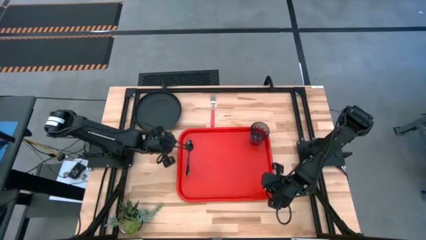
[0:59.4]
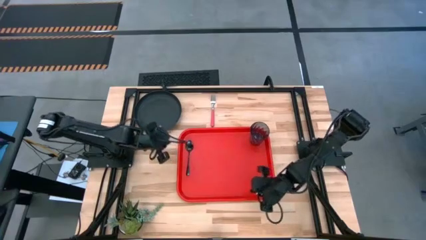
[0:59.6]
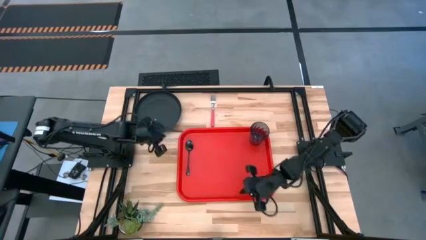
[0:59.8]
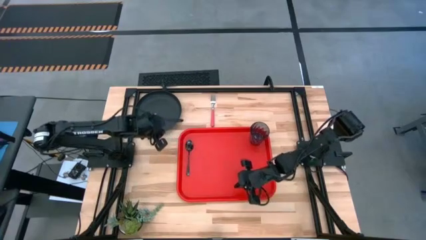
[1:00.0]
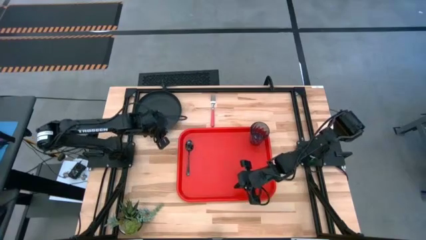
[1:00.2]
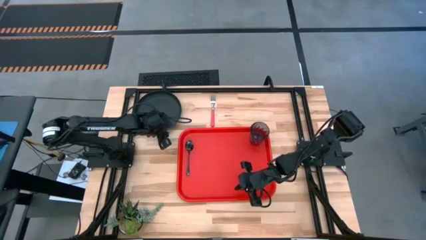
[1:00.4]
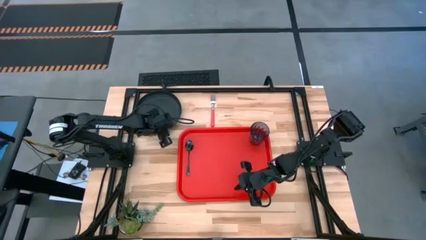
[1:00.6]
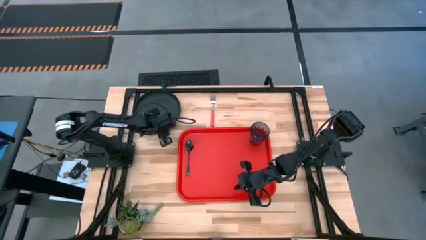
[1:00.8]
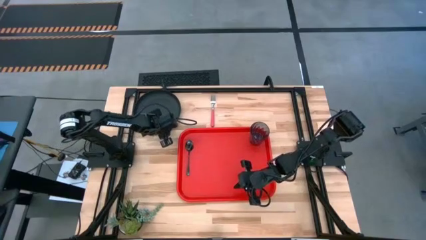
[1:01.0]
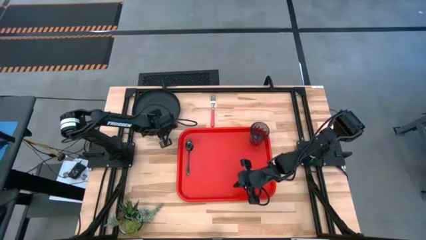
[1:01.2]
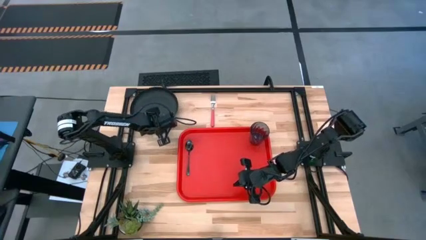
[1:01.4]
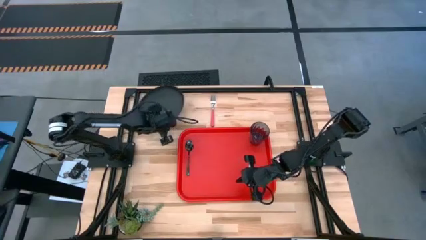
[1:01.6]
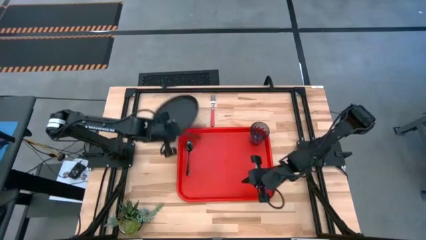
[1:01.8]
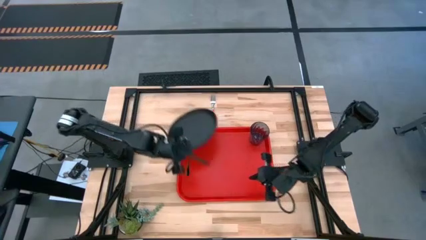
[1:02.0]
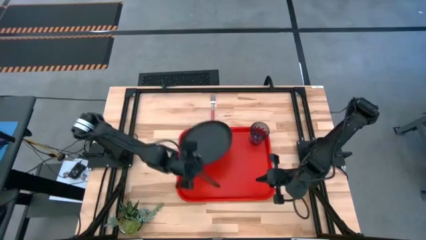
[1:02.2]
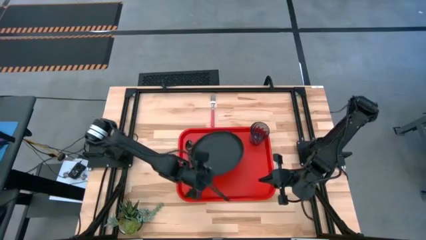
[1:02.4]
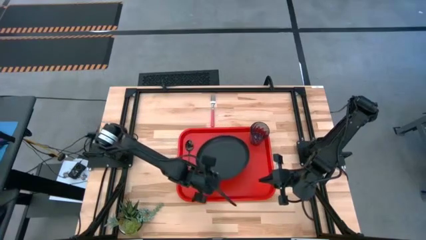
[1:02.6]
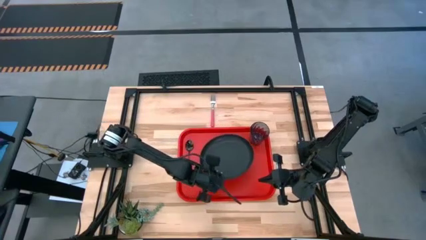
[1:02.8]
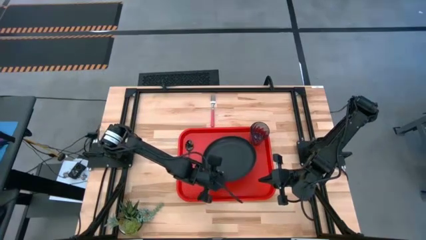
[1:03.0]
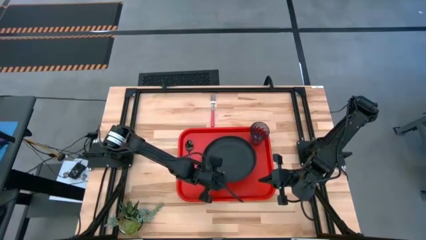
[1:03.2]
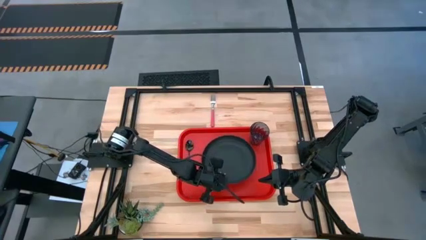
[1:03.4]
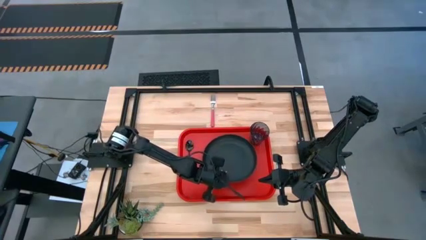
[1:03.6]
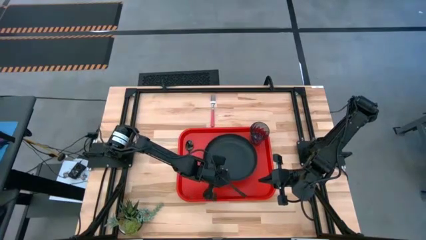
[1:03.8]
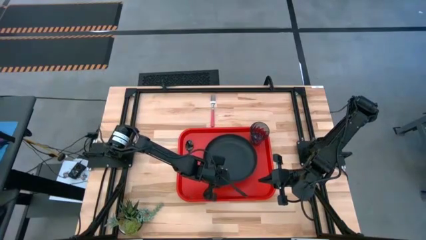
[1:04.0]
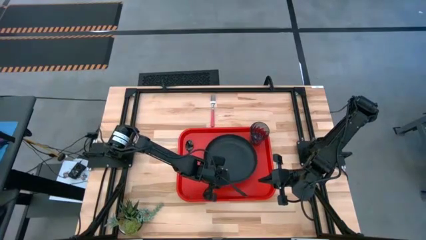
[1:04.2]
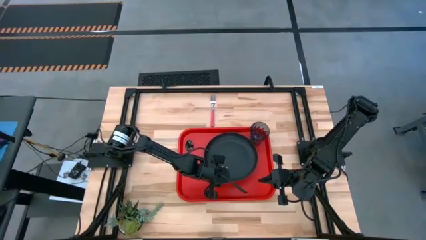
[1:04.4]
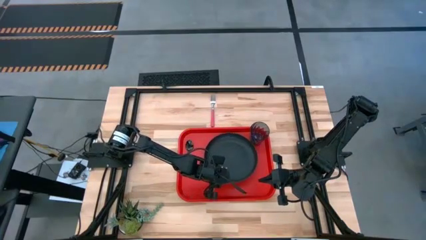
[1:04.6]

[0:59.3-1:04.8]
Task: Pick and place plate/cup/fork/spoon on tray
Put the black plate to the middle of the red serving tray

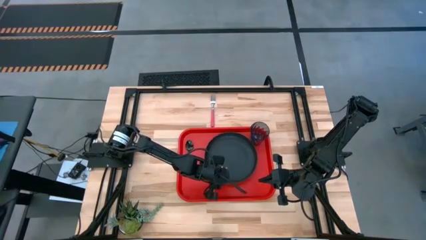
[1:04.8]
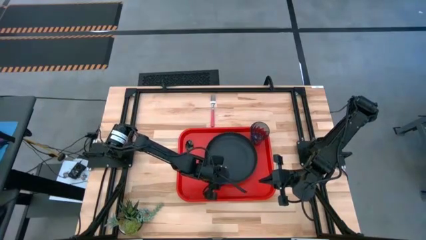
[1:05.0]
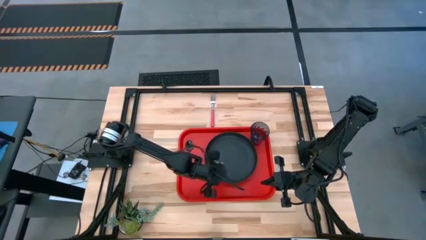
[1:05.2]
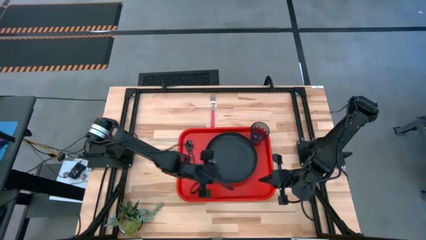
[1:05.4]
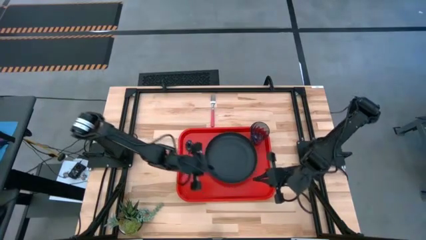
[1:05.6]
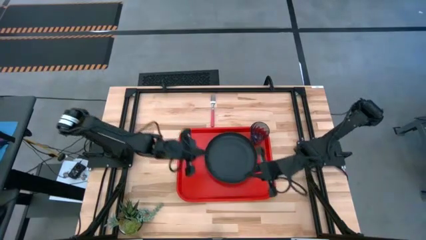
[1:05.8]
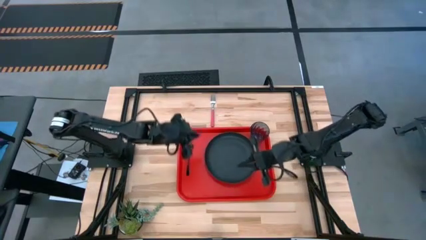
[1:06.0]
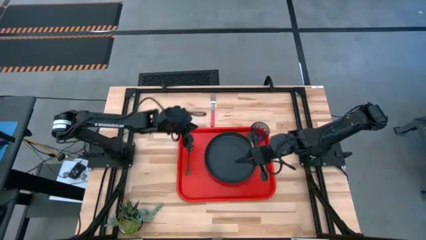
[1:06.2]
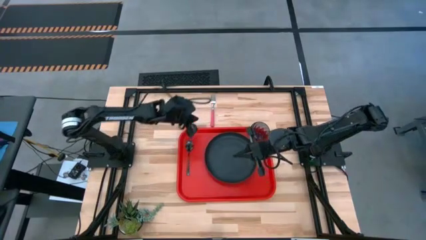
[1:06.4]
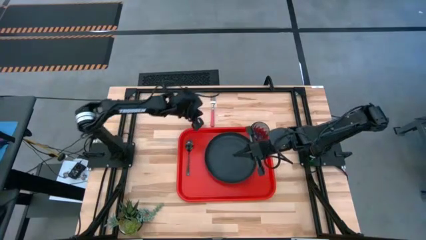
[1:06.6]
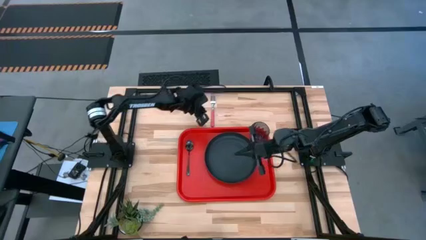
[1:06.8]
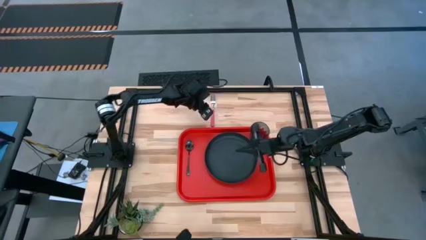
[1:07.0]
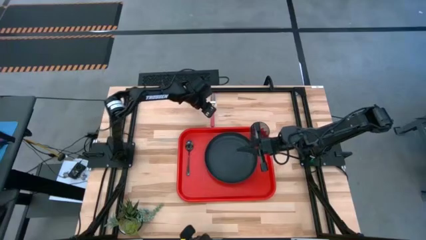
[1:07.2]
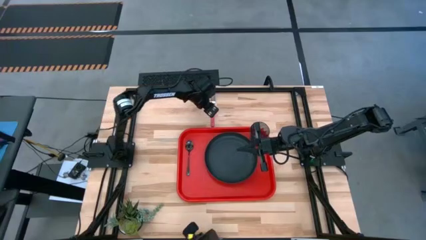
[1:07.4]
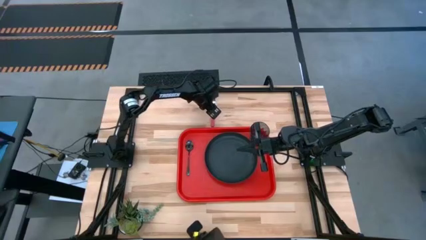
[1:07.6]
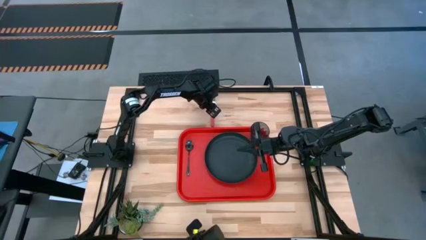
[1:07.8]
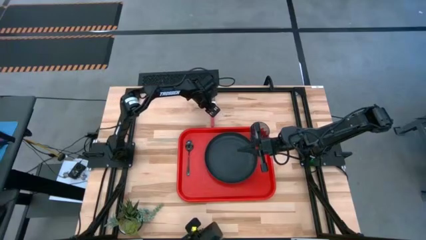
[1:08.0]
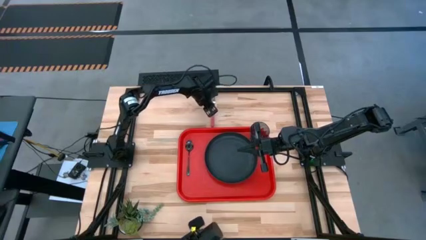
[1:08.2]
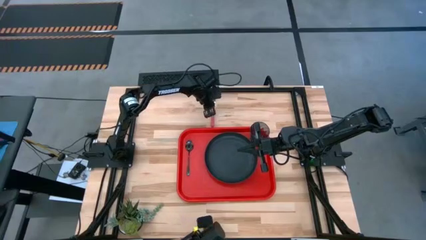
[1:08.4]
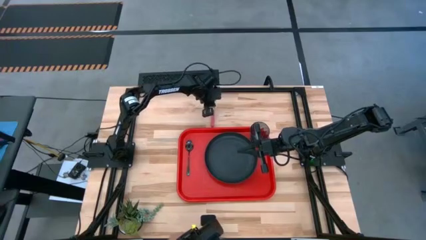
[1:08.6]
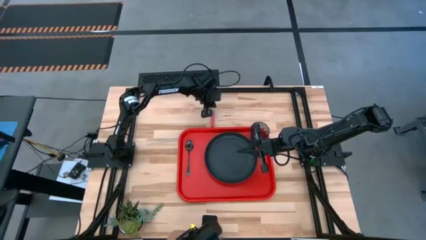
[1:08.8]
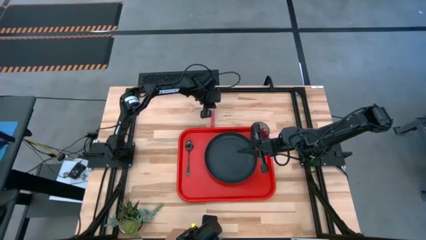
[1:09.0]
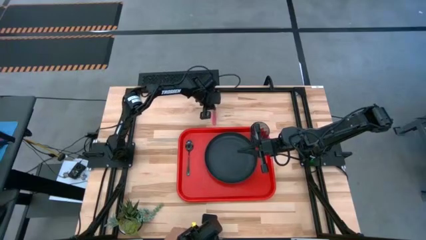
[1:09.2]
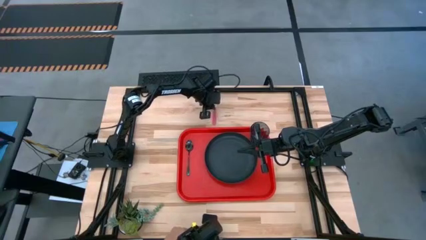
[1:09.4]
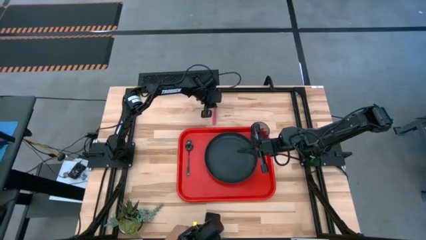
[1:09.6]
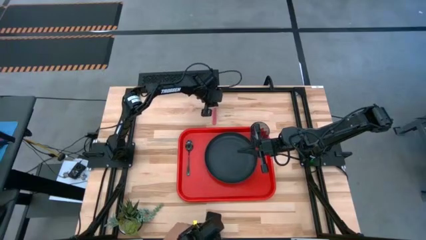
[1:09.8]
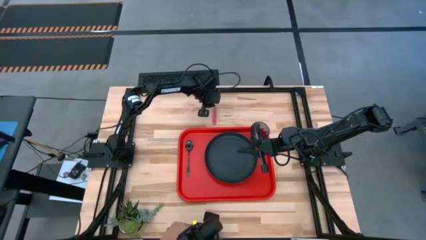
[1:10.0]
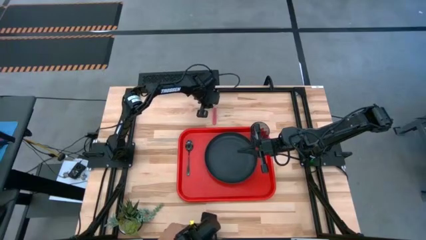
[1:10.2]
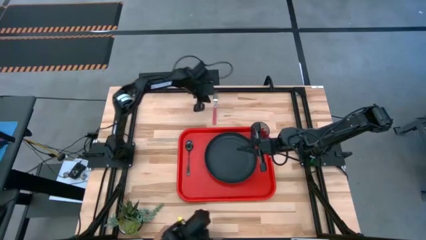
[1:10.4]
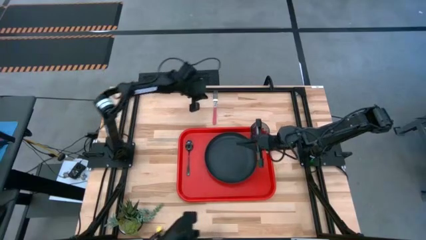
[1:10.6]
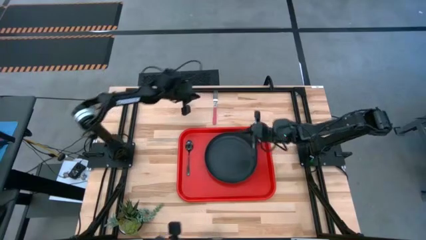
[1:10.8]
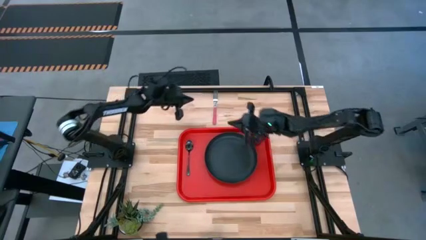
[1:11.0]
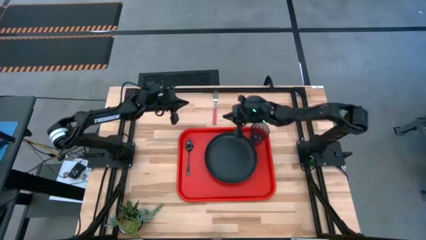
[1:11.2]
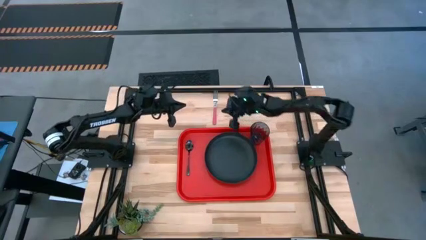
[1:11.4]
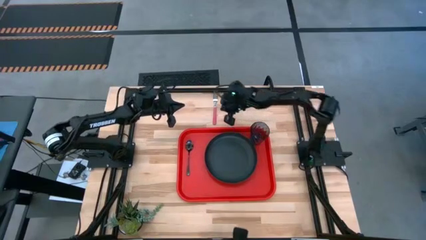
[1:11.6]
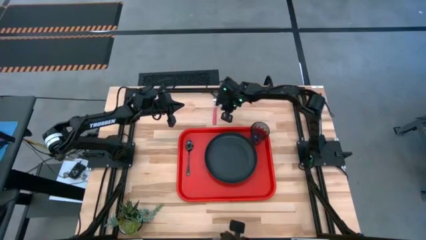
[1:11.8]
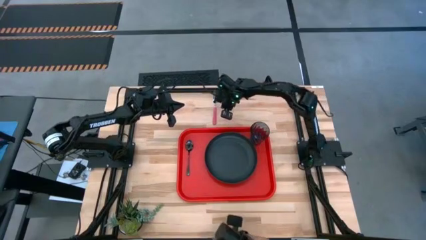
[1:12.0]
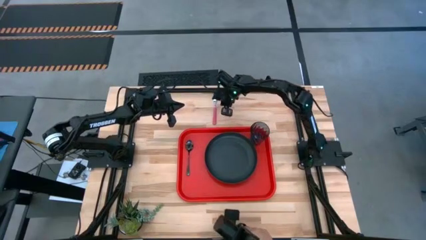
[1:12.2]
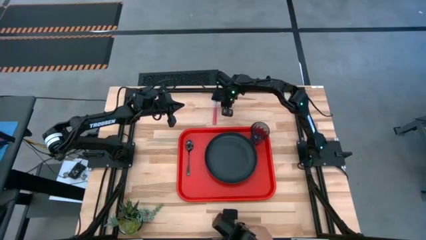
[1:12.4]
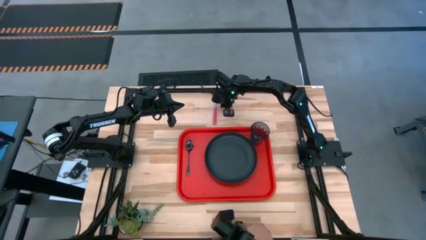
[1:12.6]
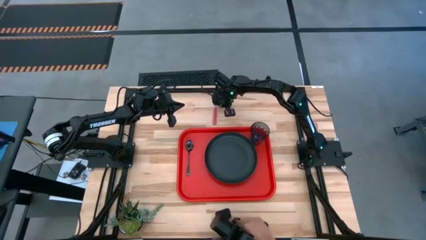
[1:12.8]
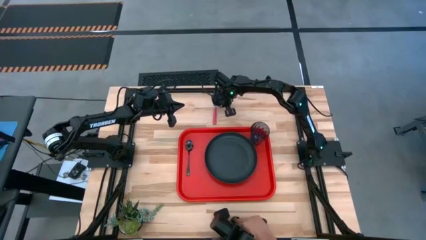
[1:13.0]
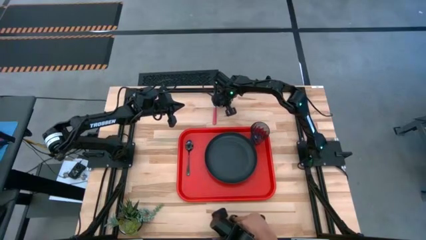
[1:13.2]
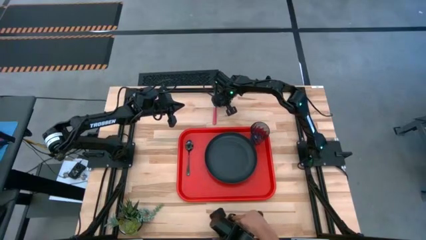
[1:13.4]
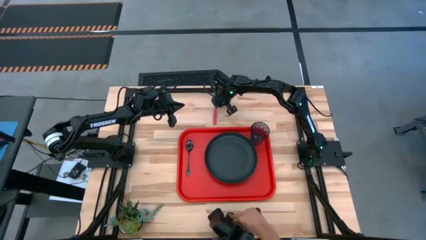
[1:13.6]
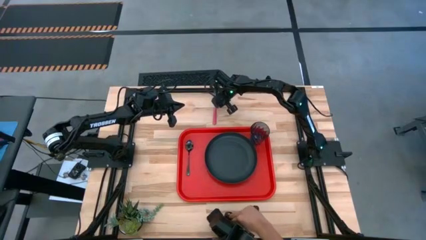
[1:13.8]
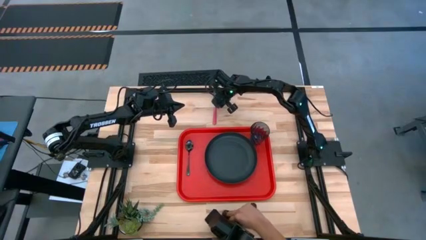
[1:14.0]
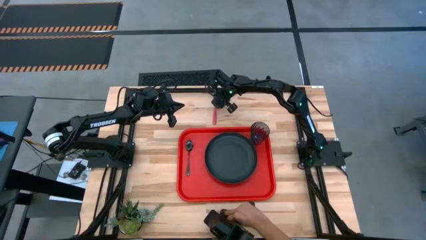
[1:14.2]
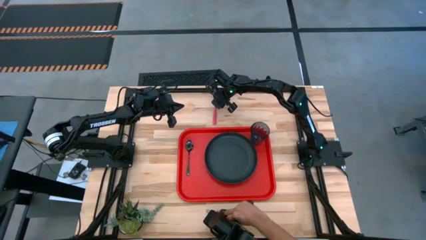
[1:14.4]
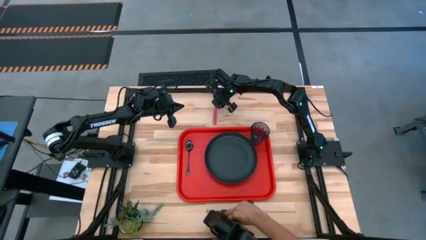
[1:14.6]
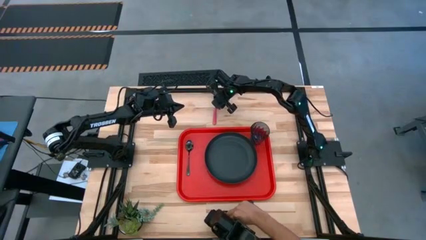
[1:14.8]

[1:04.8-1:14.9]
Put the pink fork on the red serving tray to the left of the black plate
